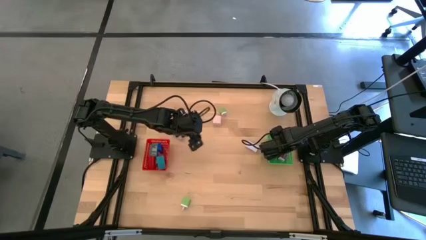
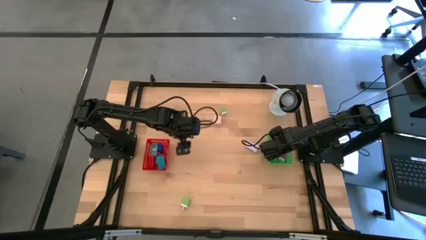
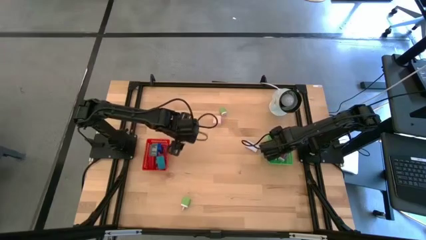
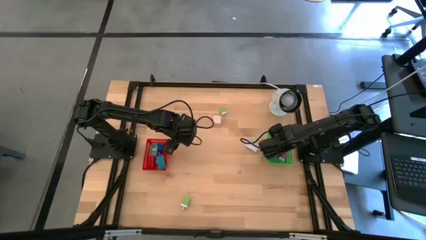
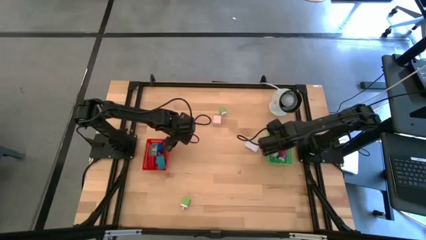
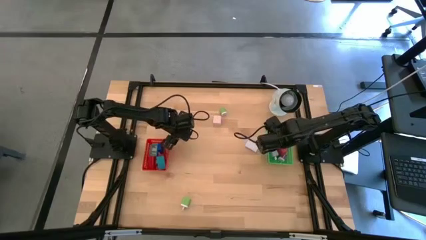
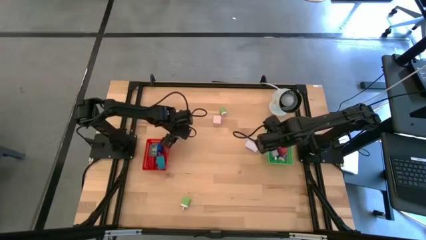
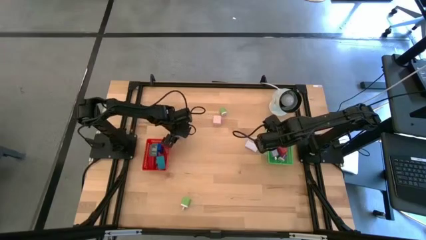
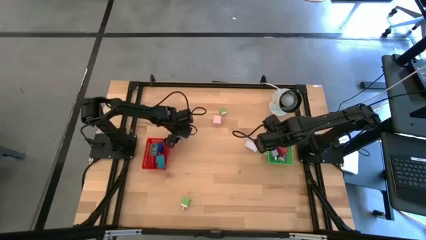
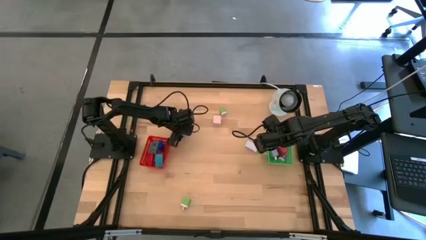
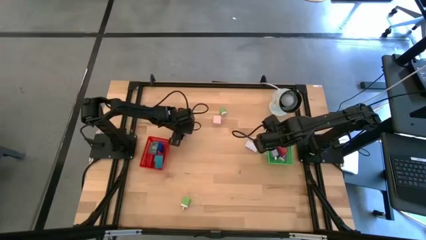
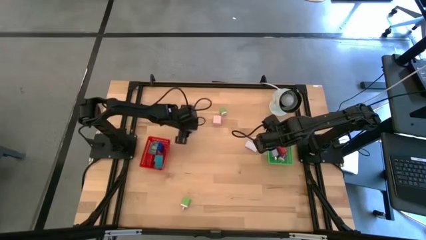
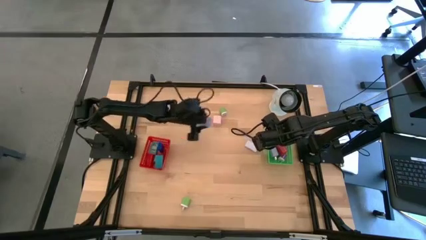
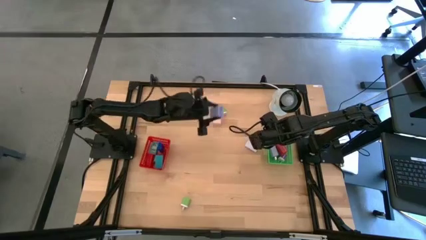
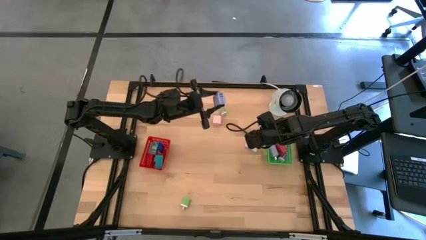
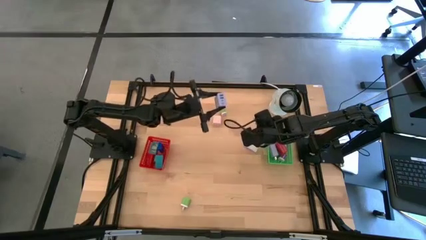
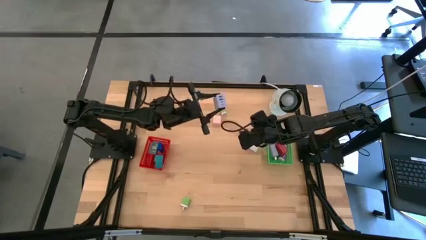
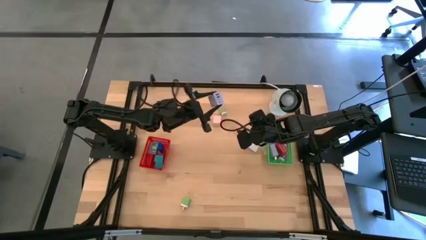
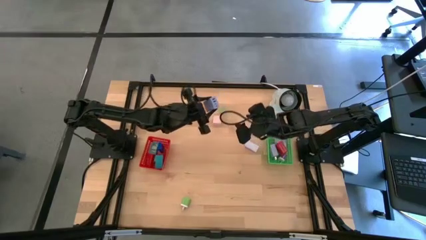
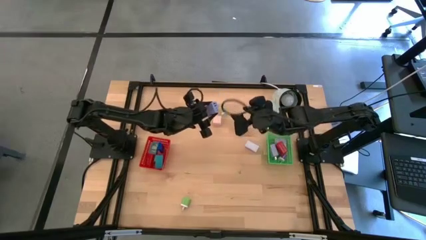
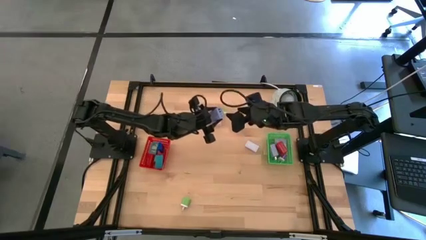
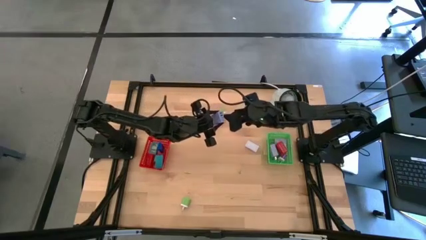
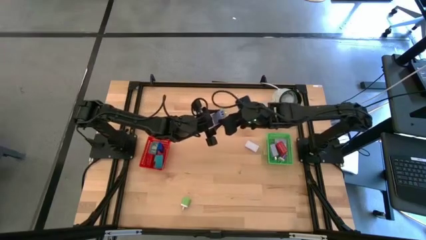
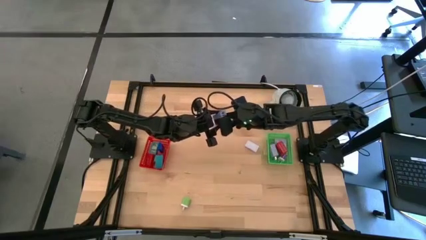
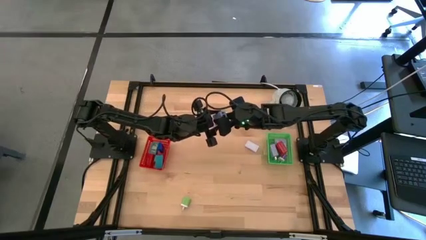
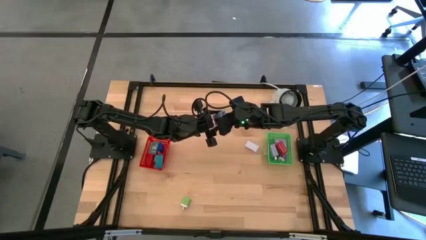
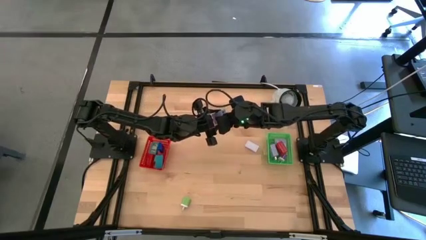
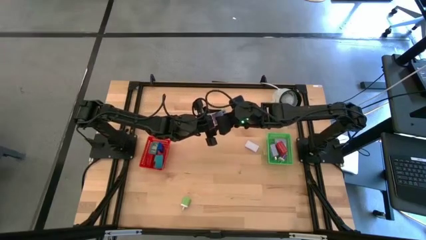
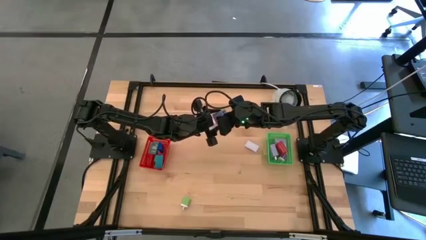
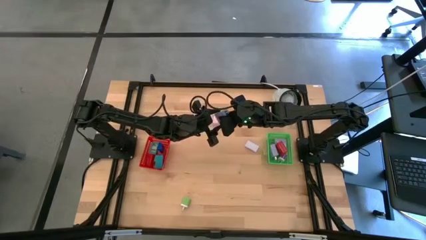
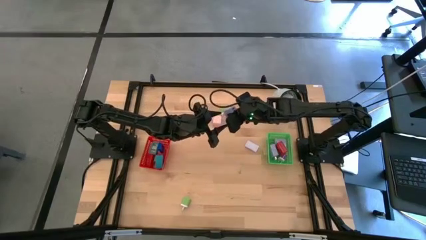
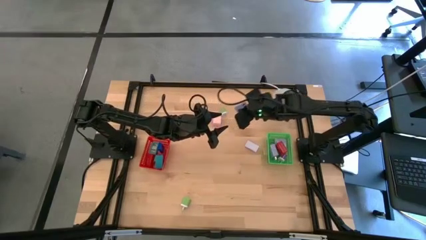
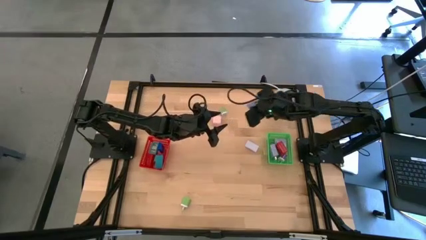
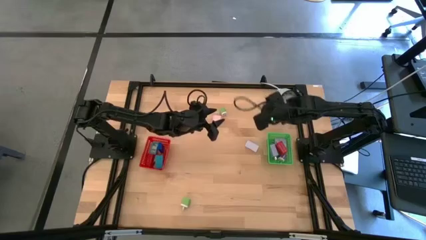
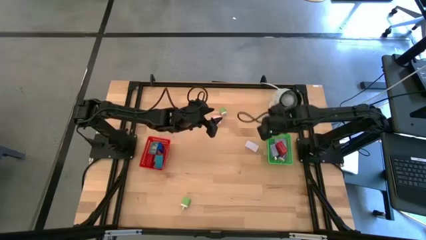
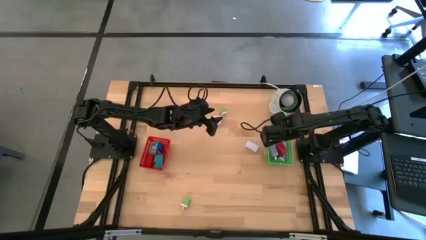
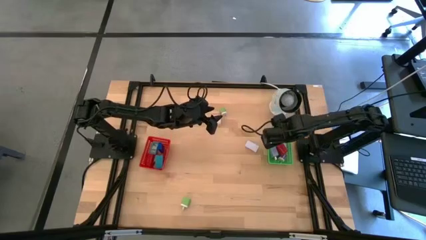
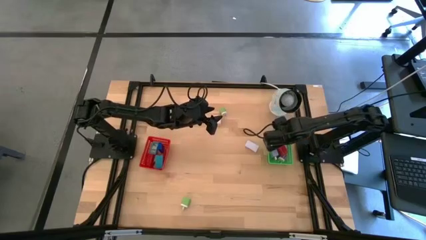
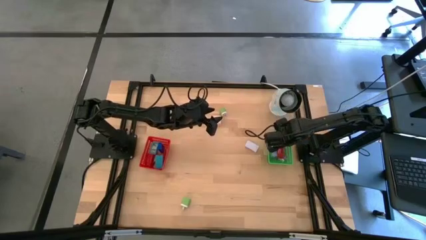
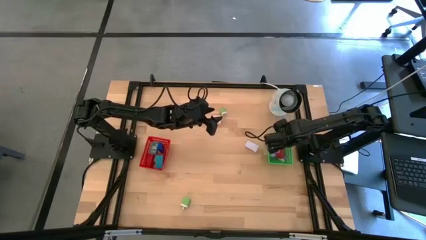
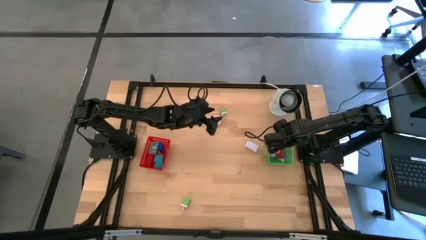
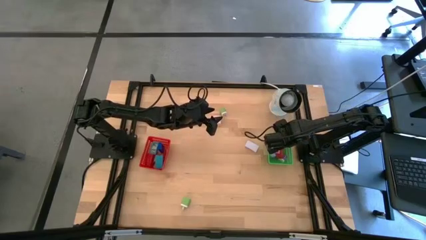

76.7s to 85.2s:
Task: Pick & Place Office items
Put the light blue charger adapter into the green basket

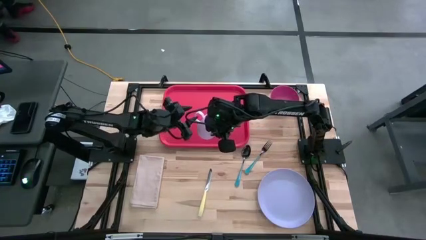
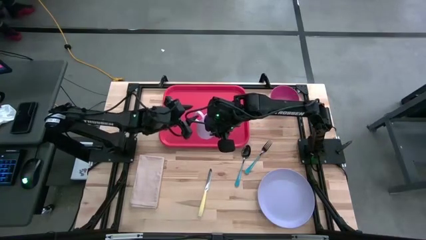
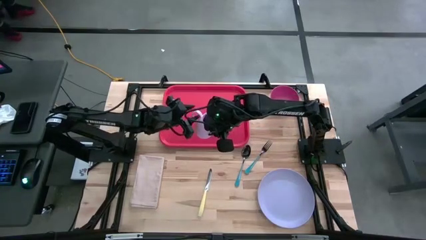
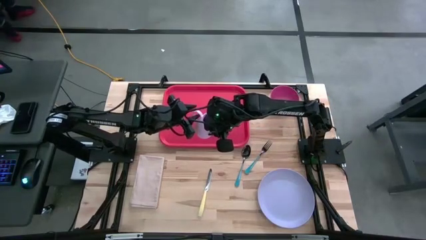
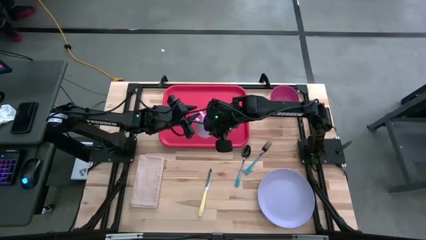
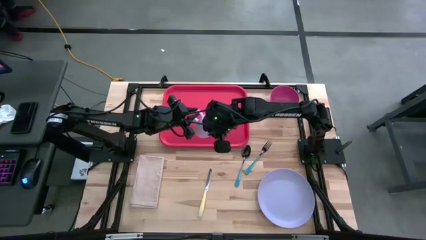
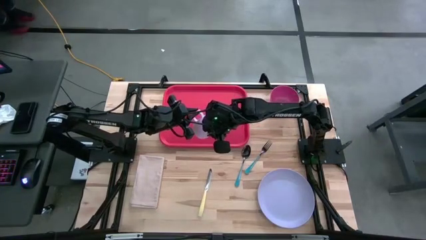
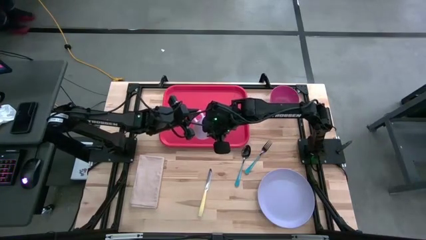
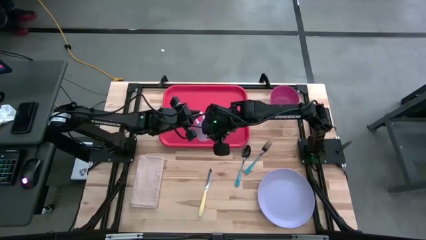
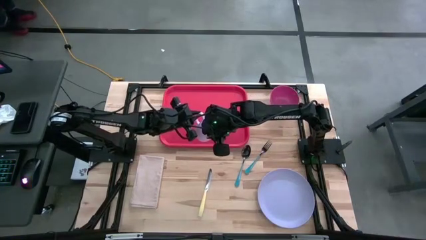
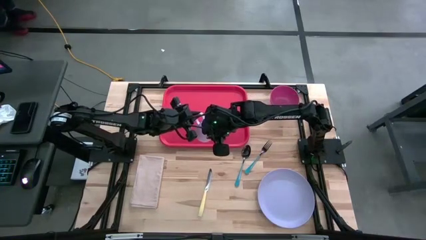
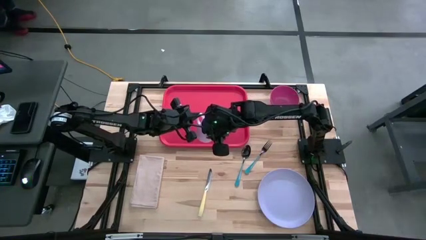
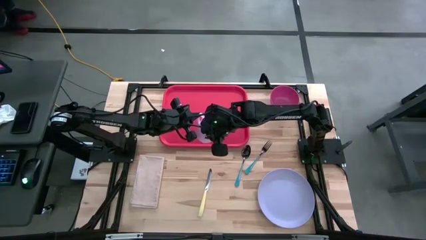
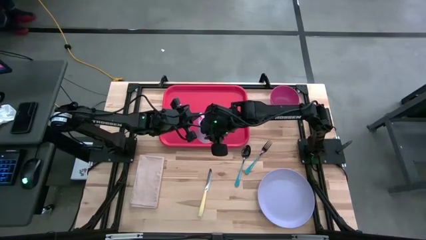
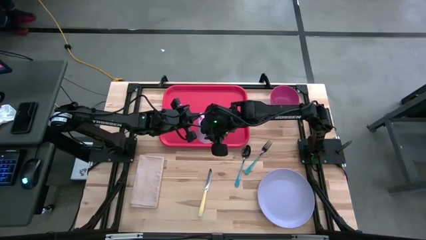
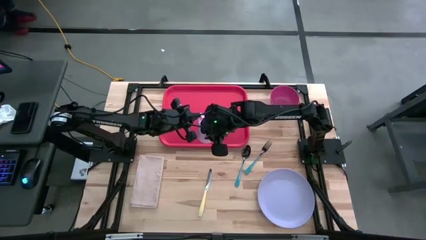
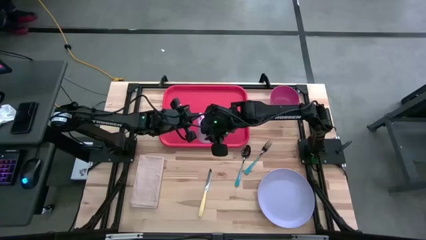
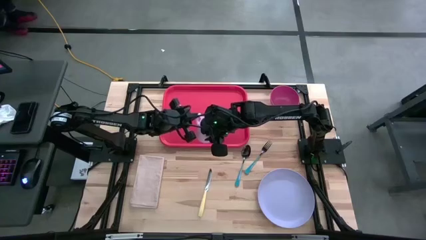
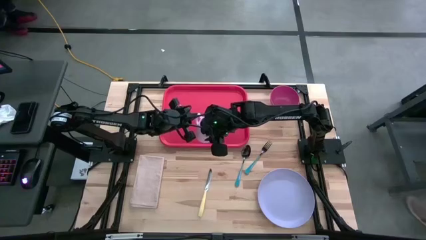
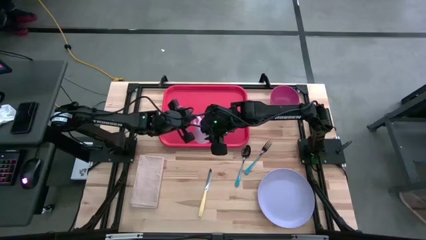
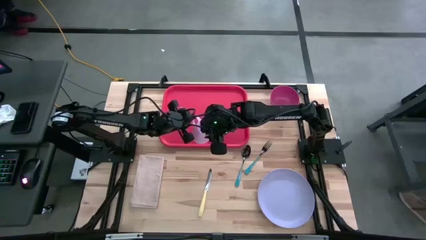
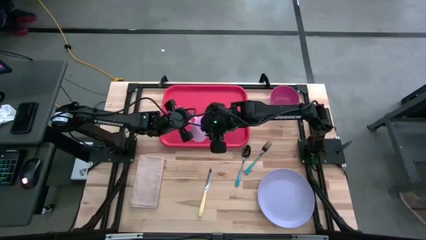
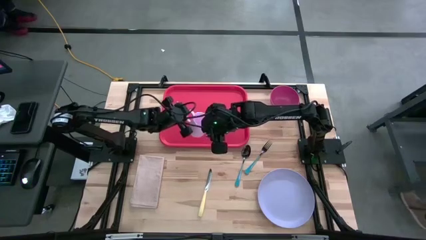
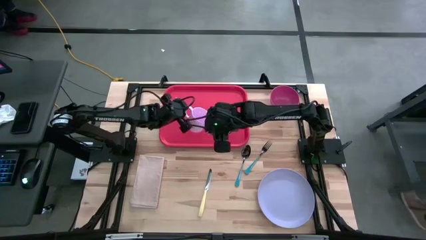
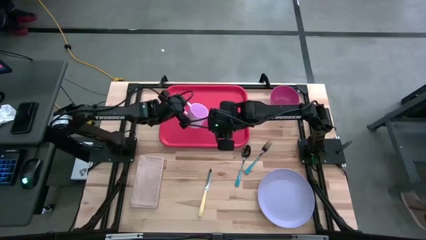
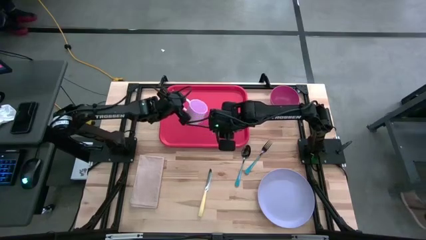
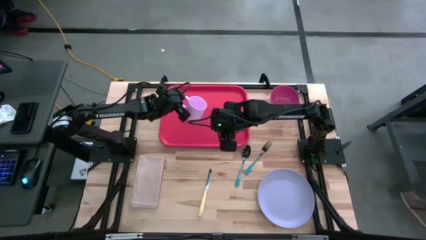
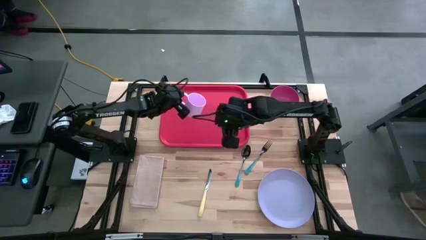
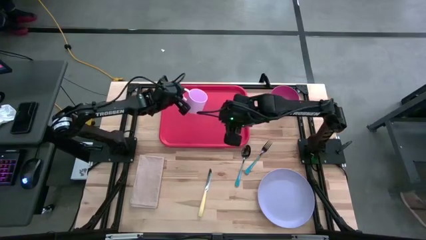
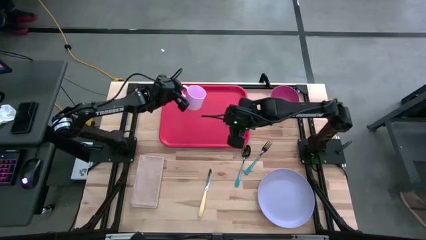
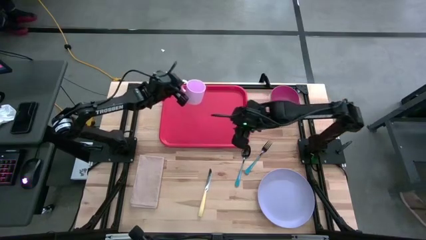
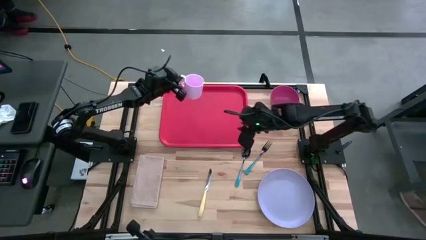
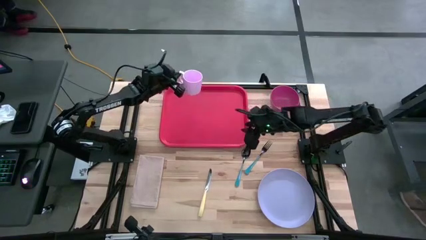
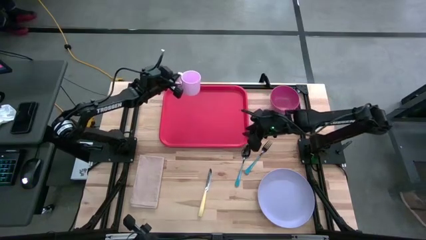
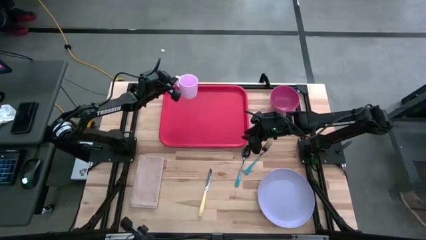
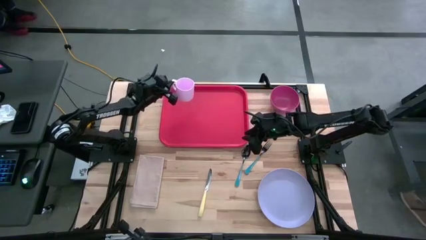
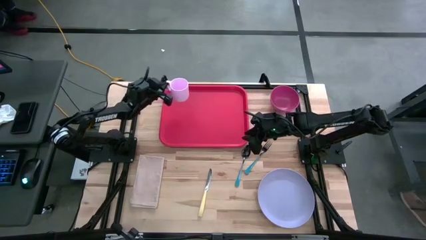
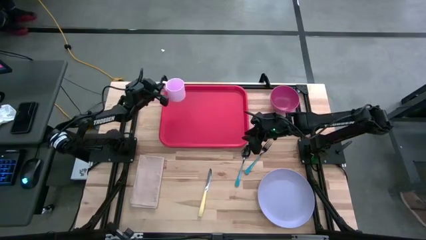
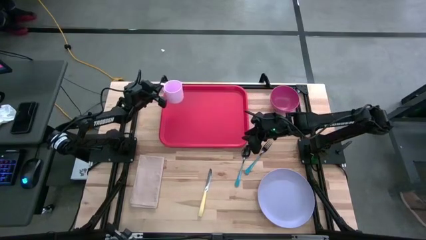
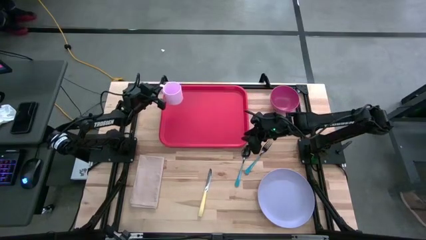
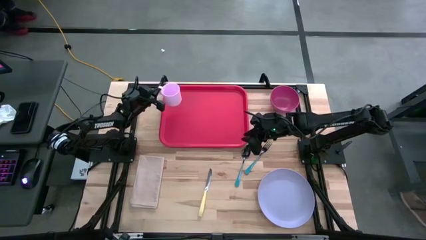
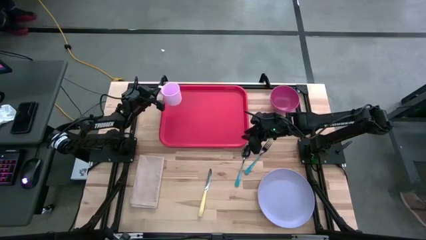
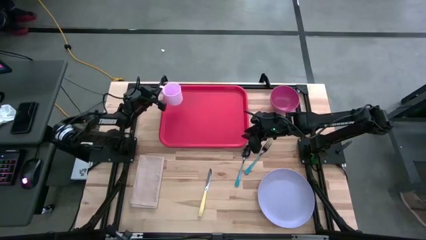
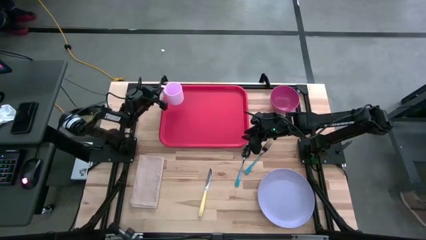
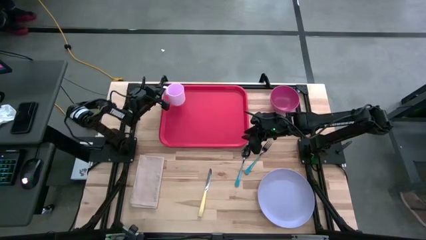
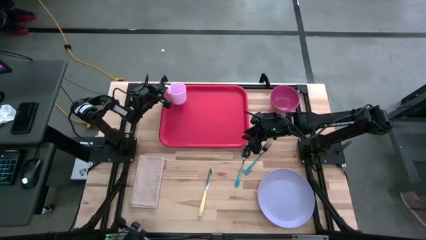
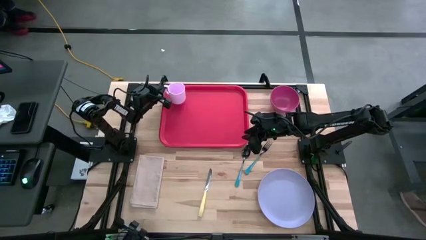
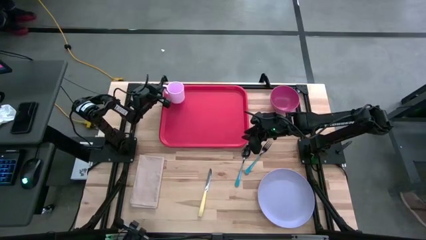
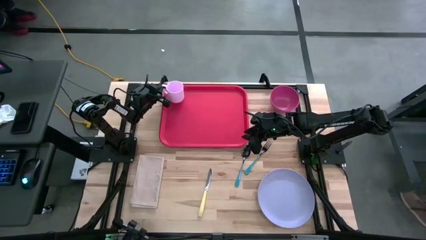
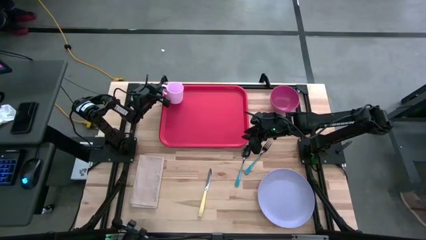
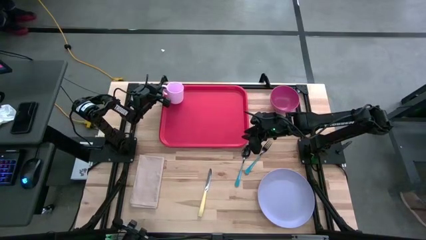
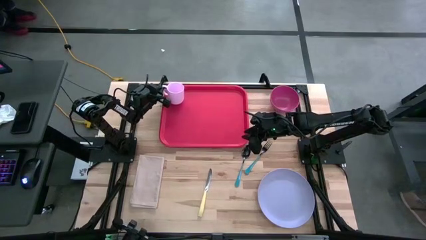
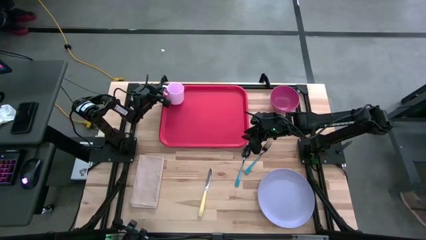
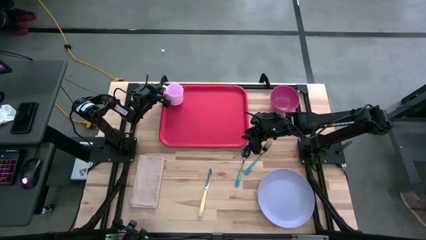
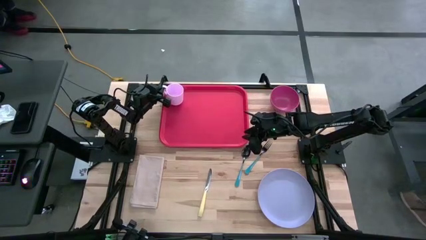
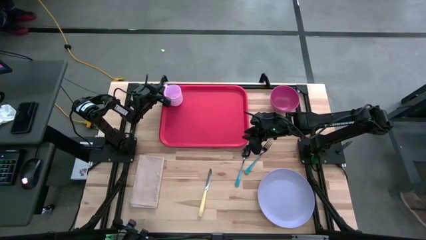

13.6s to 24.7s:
Task: Set up tray
Put the pink cup on the red serving tray
